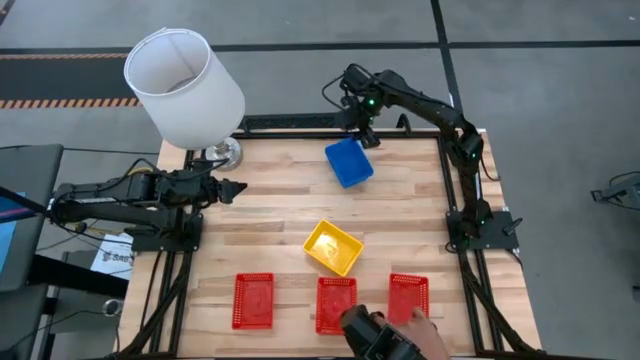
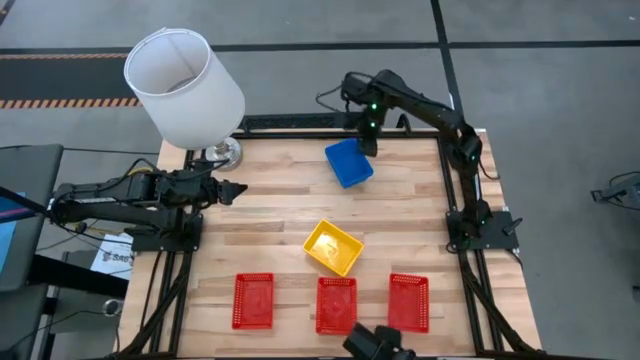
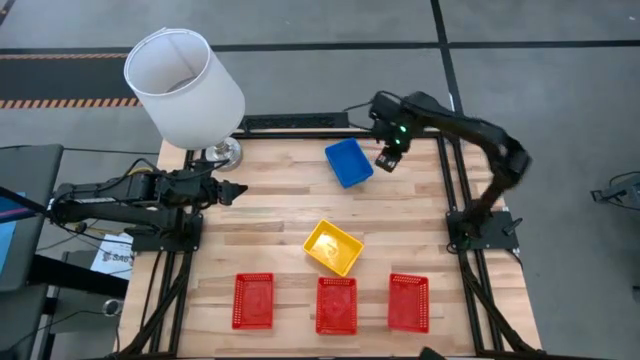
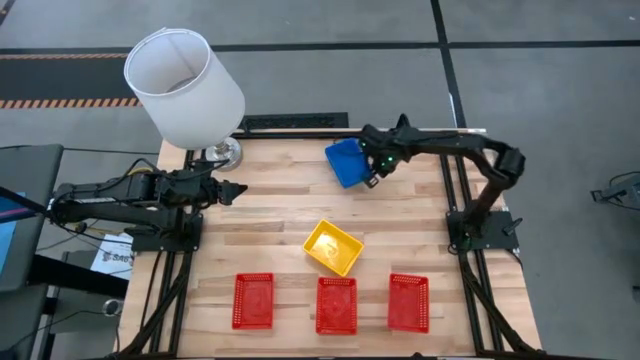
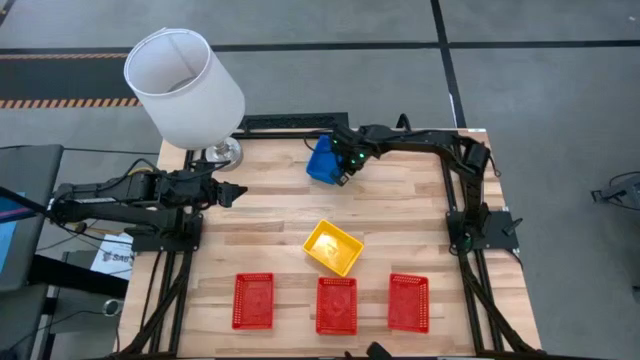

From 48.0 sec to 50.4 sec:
Adjust the stacked blue bins

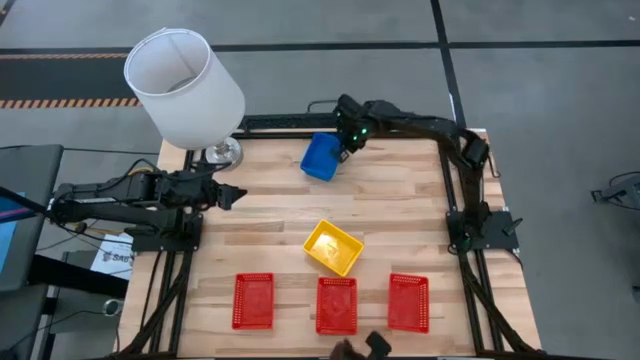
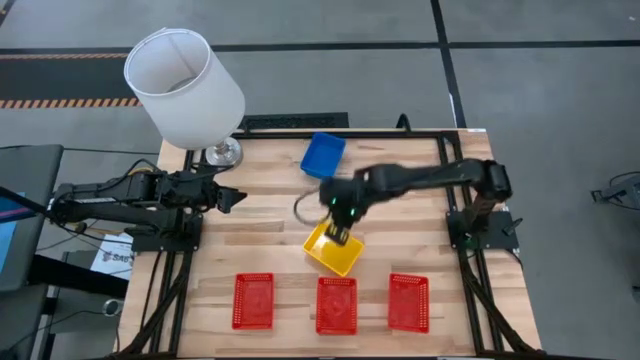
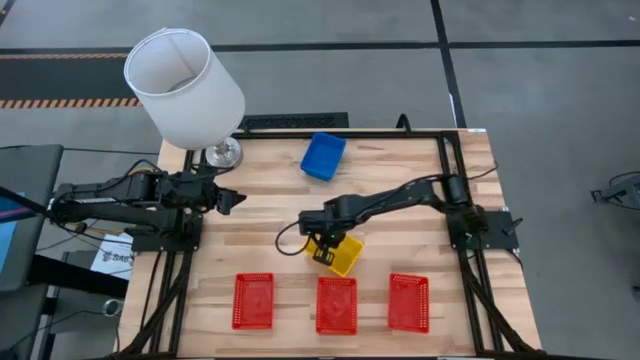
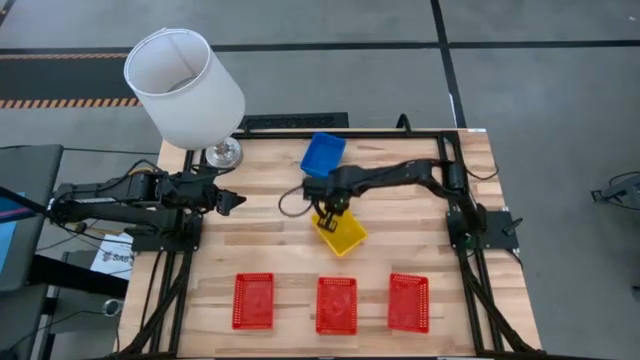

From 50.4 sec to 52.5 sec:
Adjust the stacked yellow bins

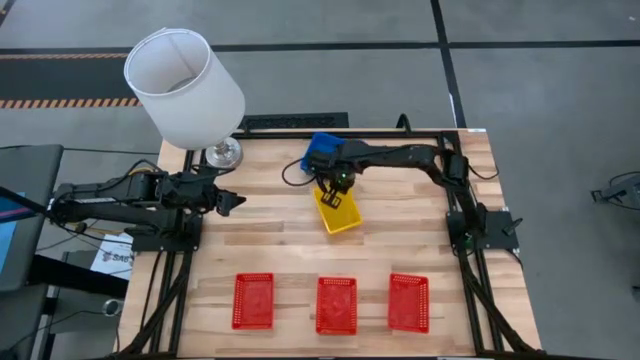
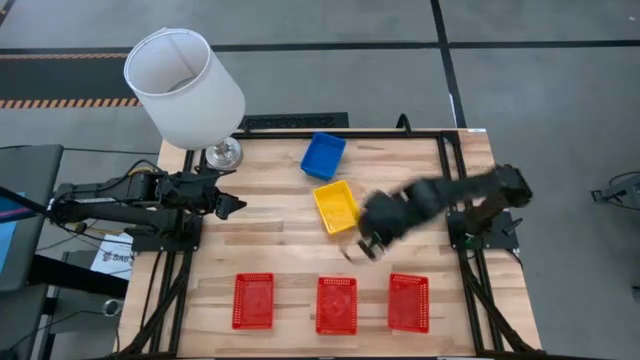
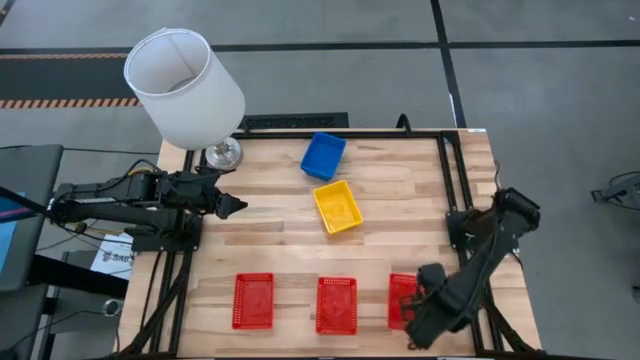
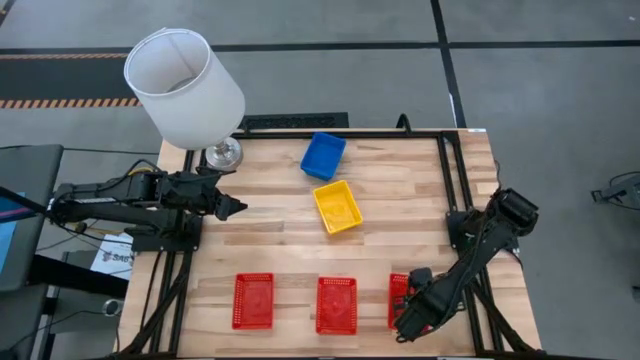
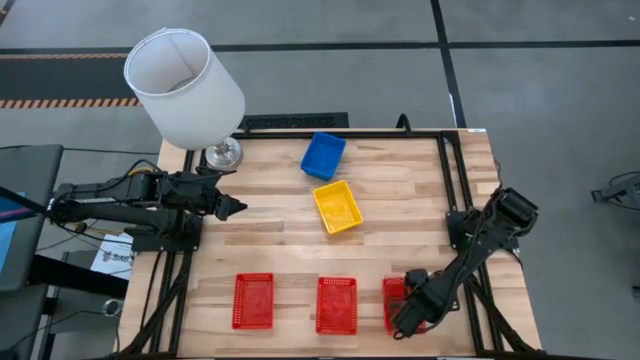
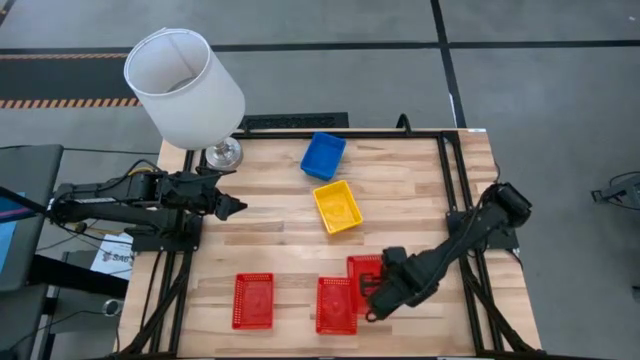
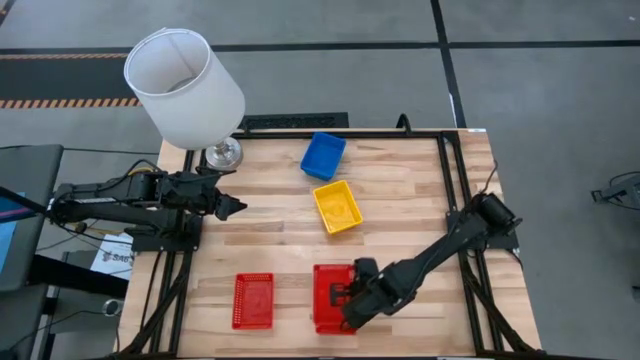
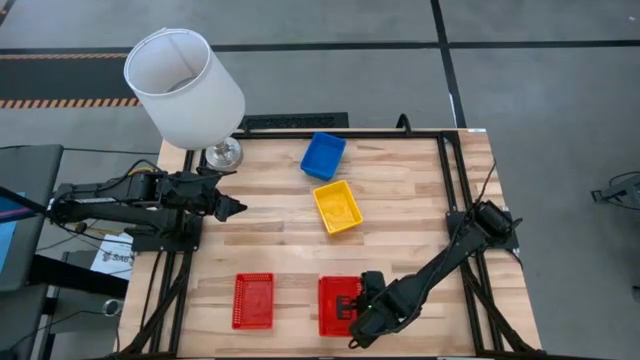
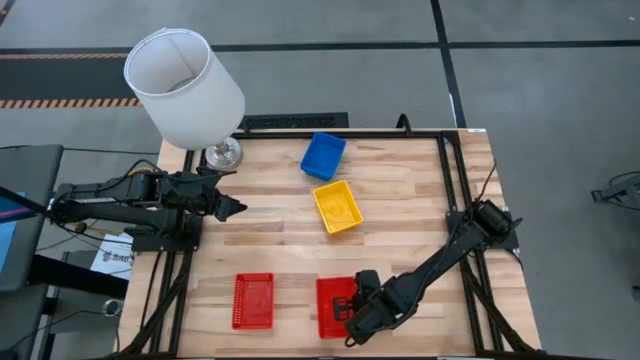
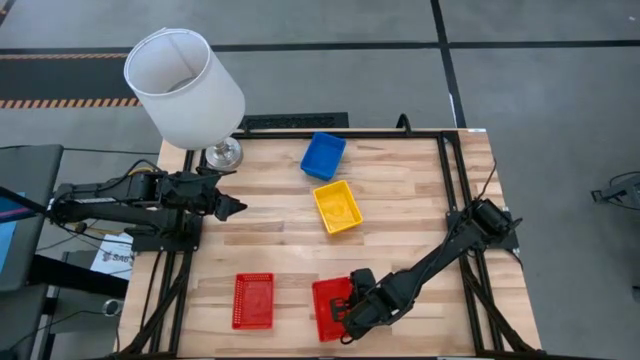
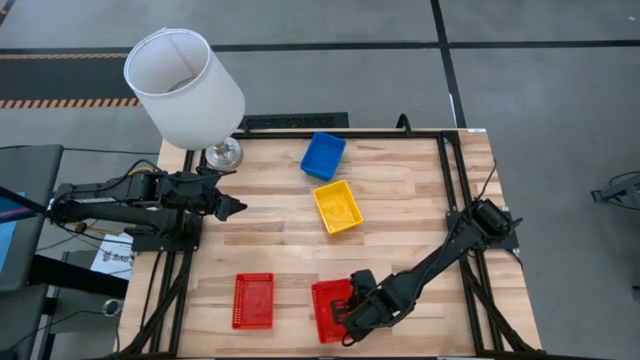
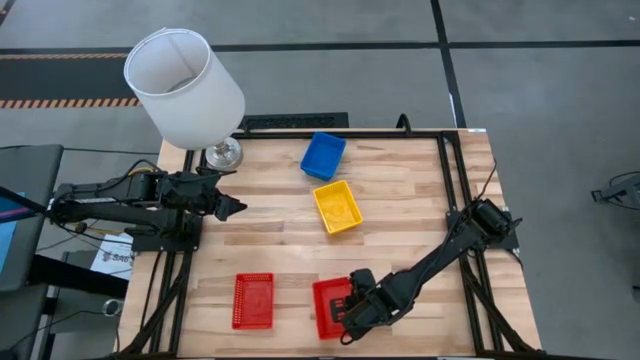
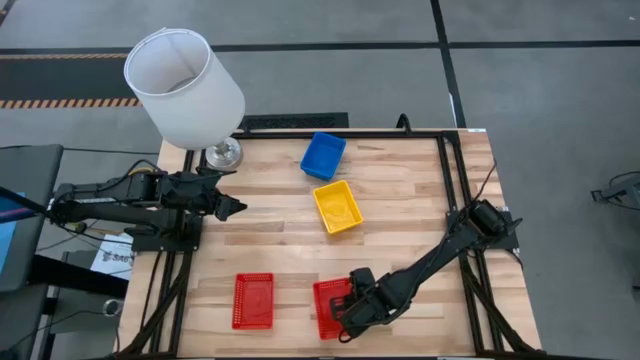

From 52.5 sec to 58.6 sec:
Stack the right red bin on the middle red bin

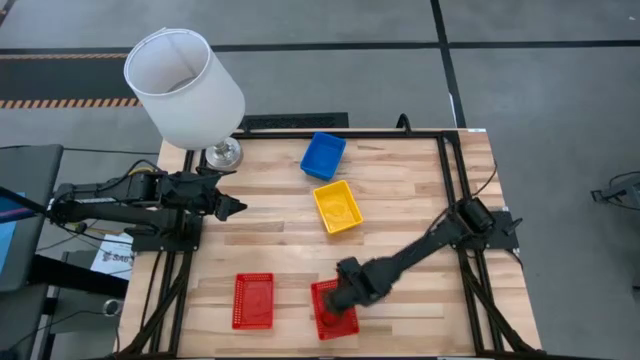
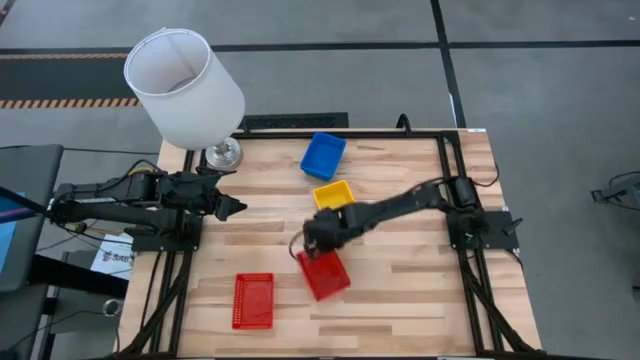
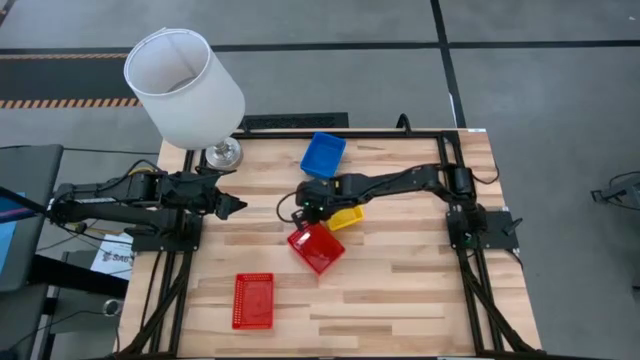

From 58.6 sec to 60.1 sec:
Move the stacked red bins to the center of the table

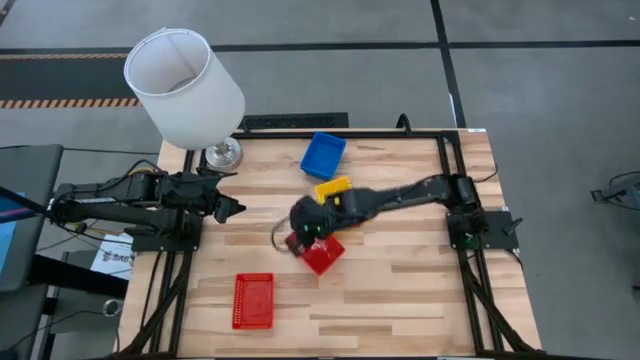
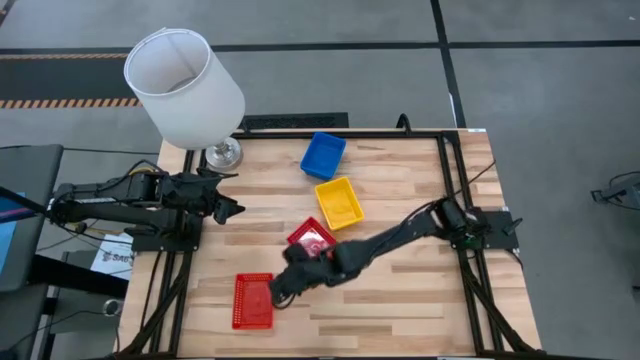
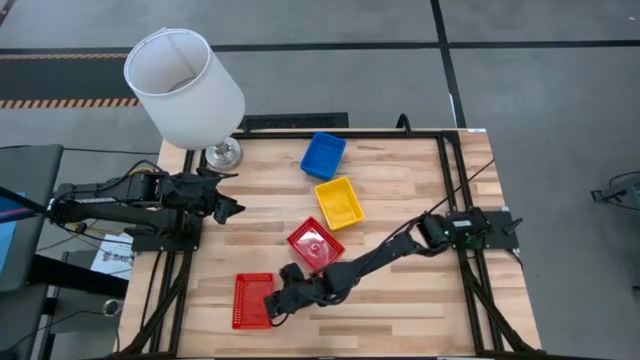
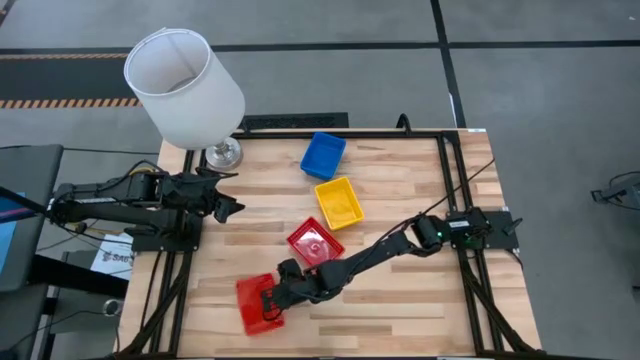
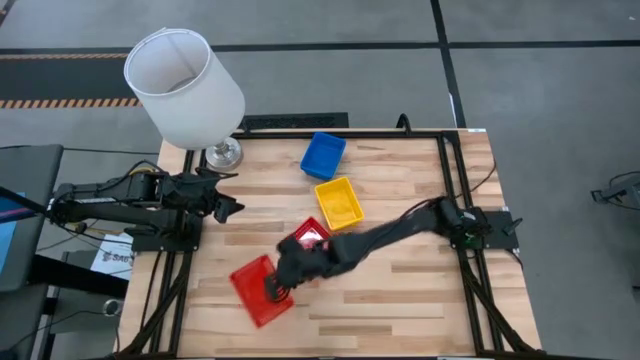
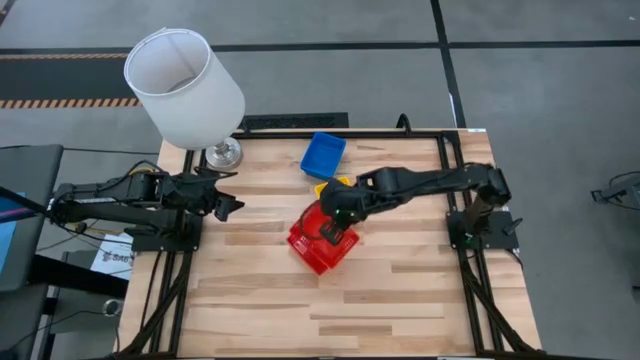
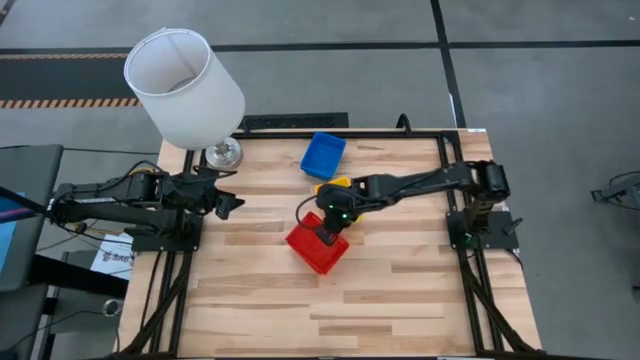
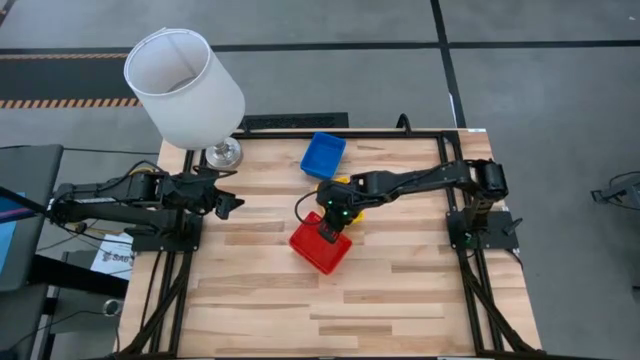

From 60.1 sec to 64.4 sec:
Stack the bottom red bin on the red bin

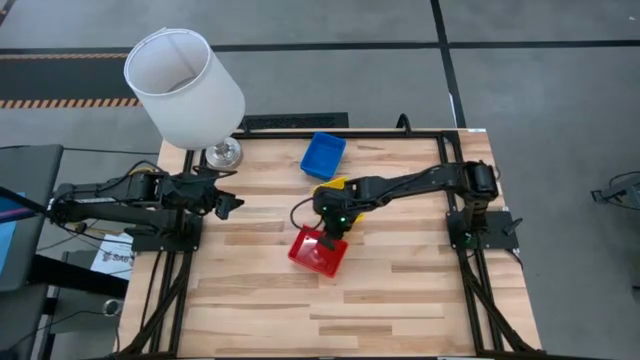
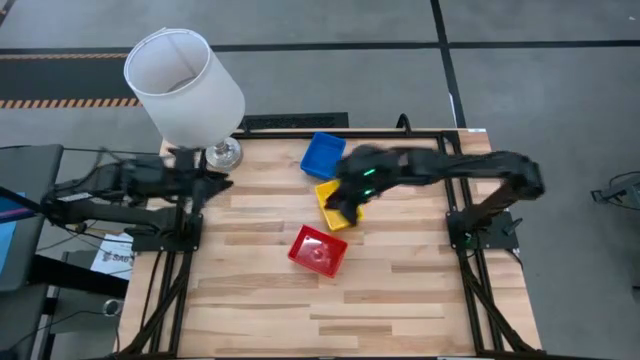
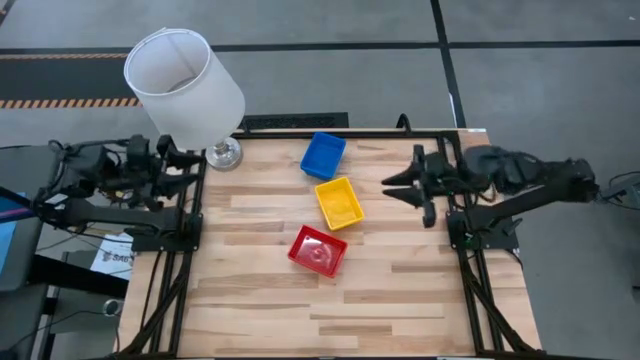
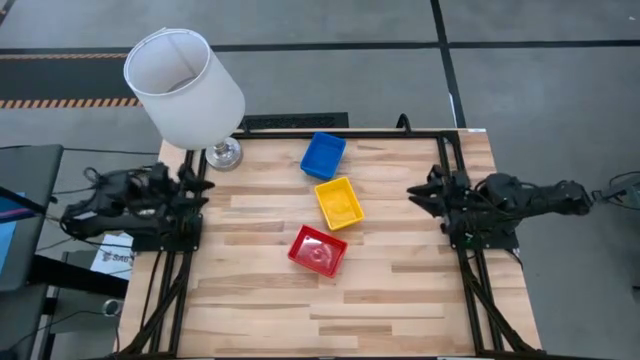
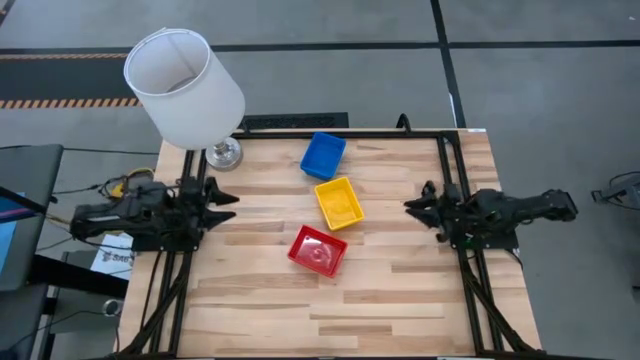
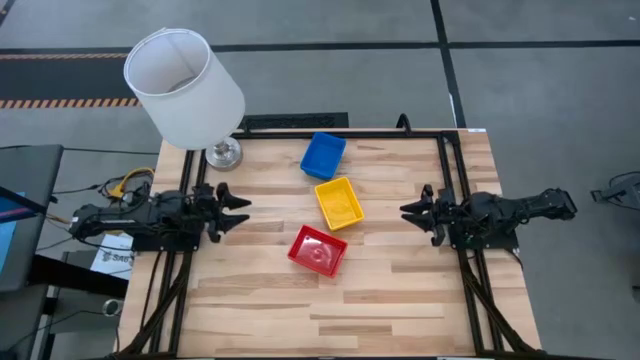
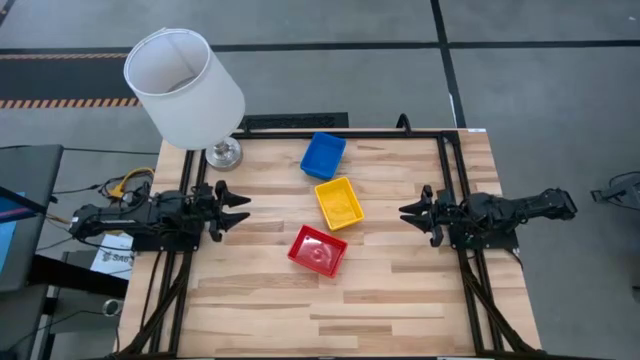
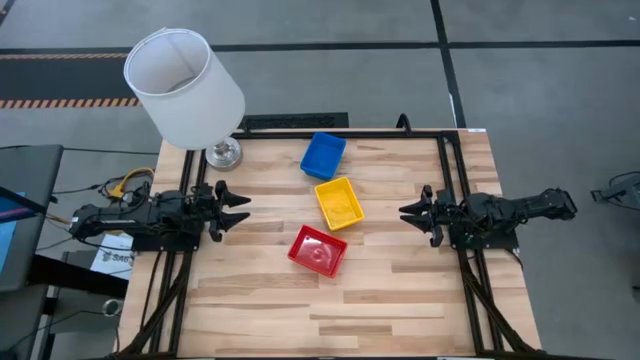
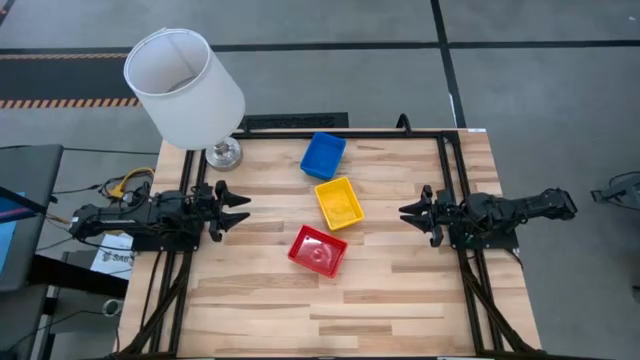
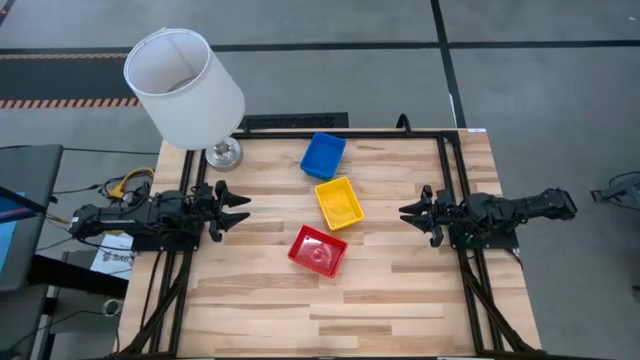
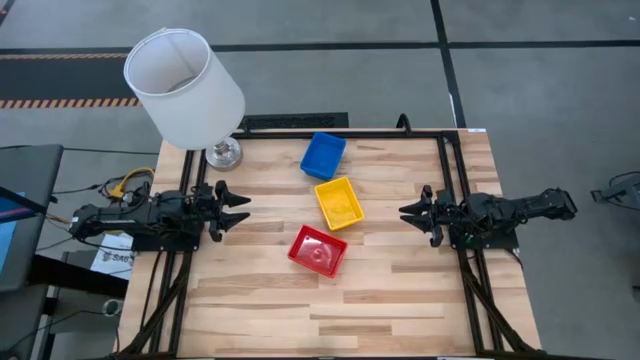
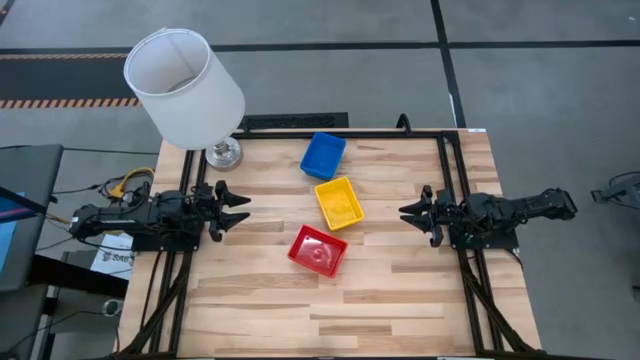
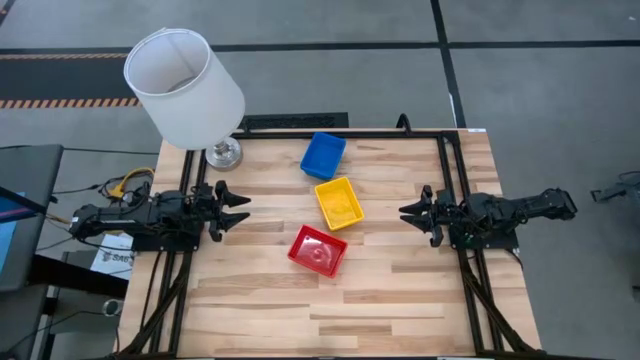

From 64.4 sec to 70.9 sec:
Return to Home Position
